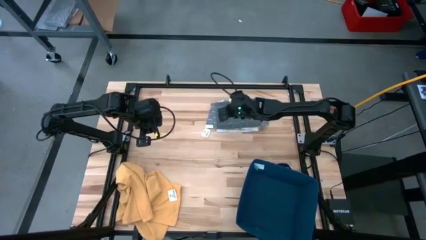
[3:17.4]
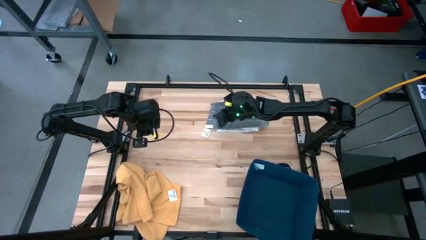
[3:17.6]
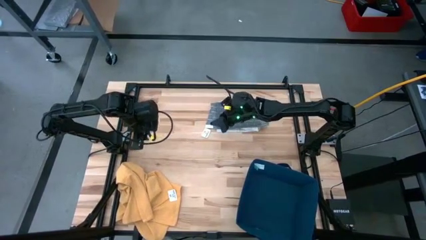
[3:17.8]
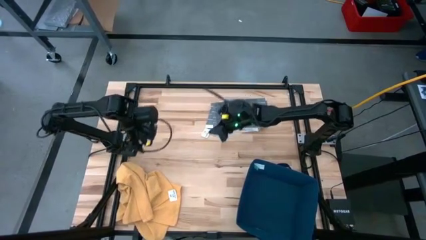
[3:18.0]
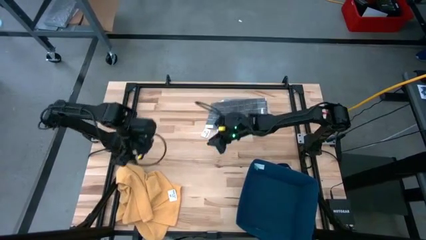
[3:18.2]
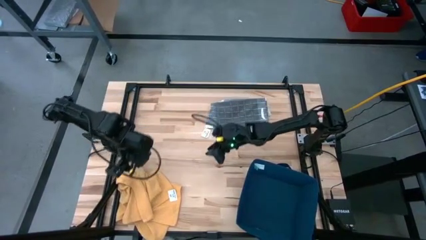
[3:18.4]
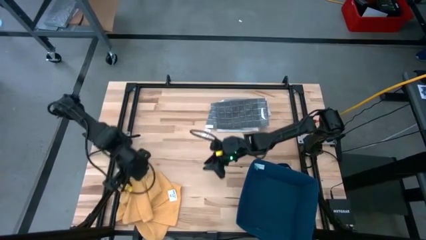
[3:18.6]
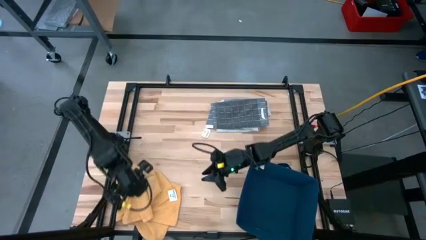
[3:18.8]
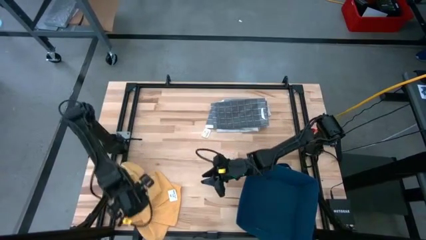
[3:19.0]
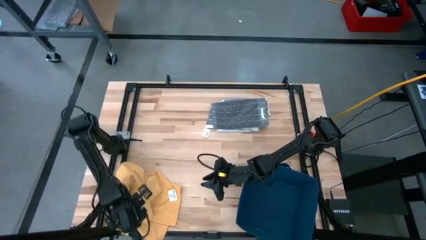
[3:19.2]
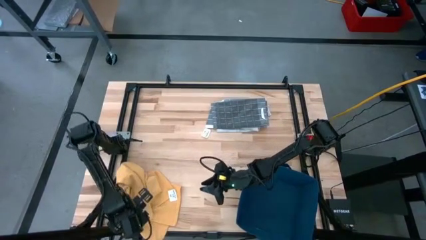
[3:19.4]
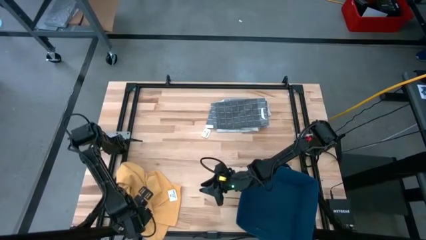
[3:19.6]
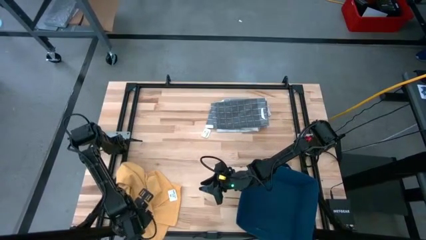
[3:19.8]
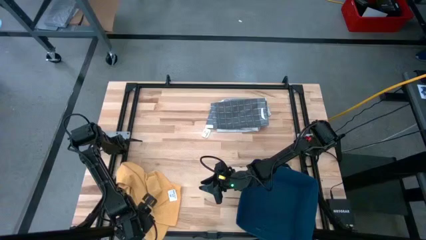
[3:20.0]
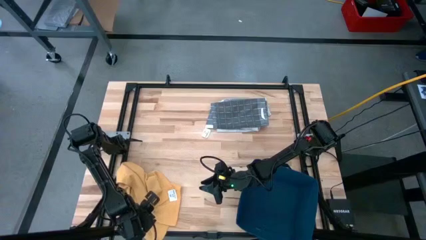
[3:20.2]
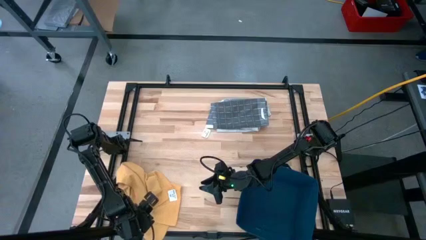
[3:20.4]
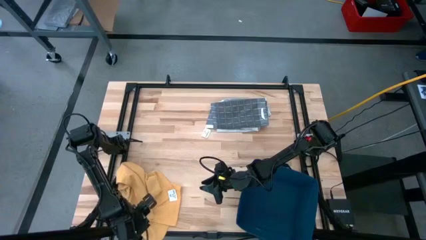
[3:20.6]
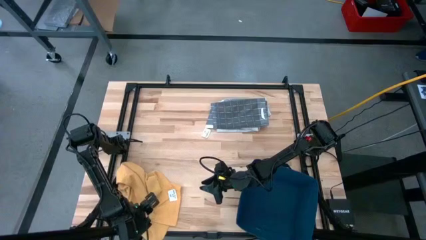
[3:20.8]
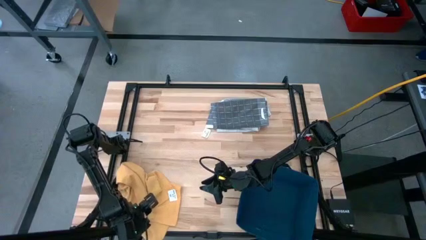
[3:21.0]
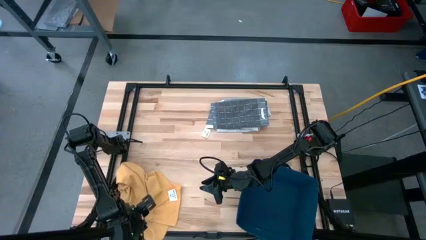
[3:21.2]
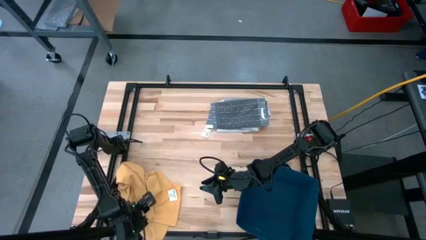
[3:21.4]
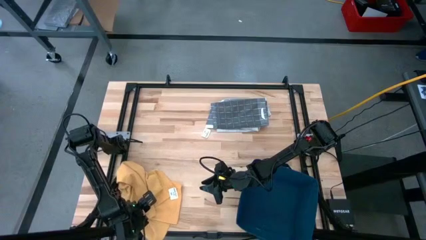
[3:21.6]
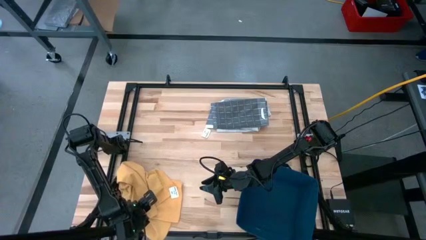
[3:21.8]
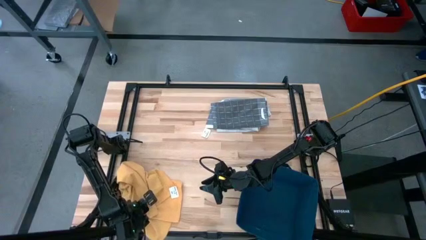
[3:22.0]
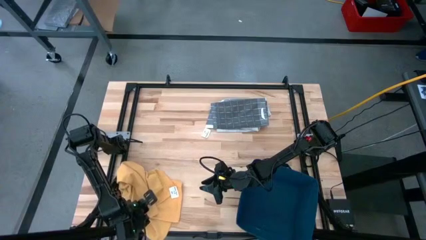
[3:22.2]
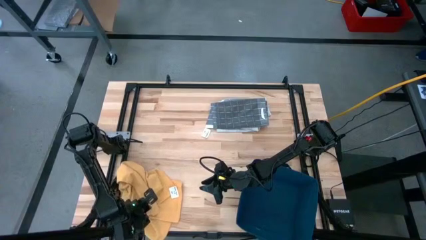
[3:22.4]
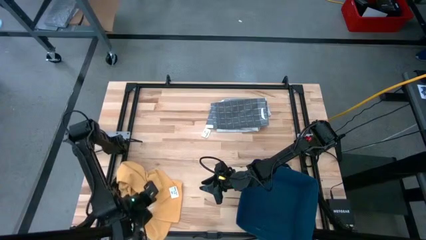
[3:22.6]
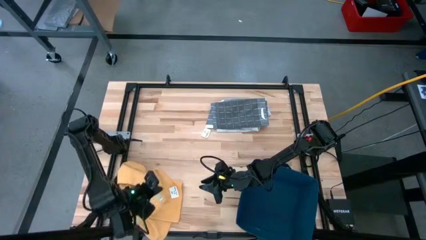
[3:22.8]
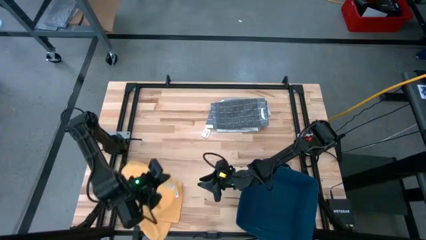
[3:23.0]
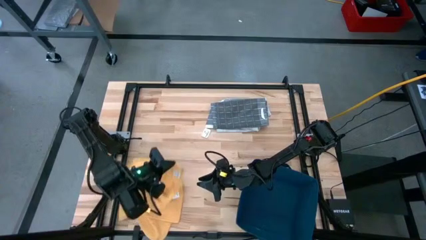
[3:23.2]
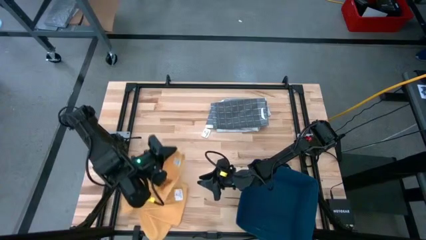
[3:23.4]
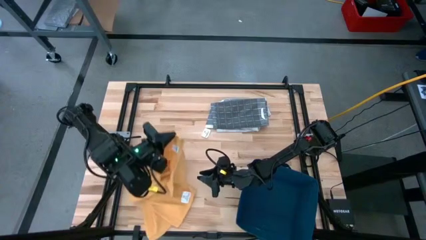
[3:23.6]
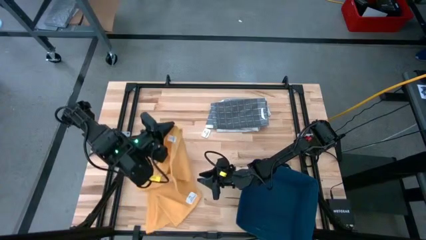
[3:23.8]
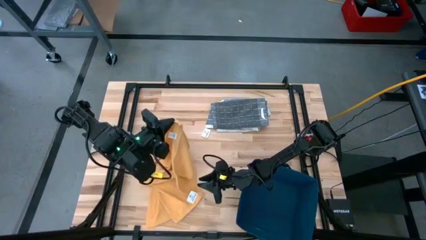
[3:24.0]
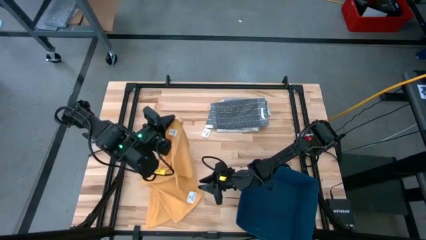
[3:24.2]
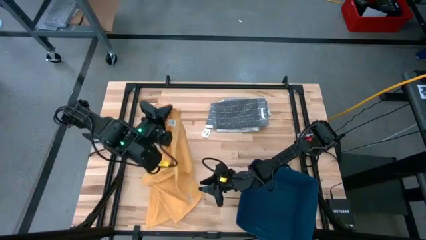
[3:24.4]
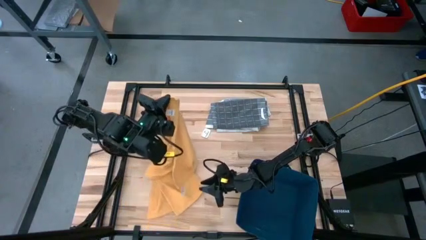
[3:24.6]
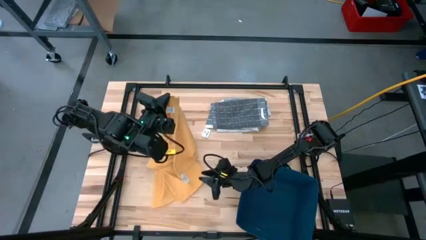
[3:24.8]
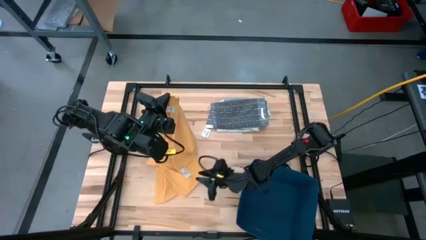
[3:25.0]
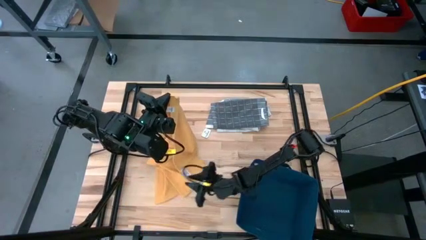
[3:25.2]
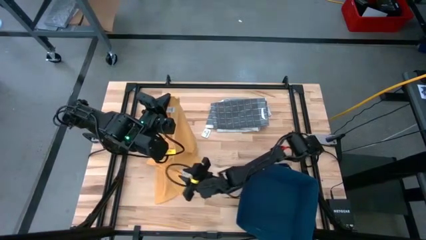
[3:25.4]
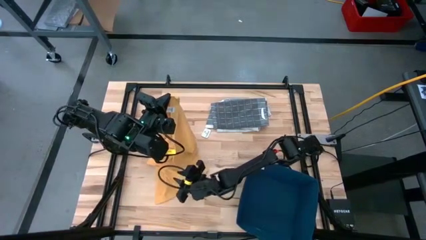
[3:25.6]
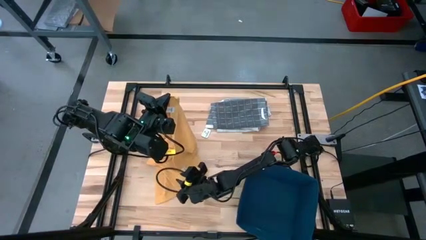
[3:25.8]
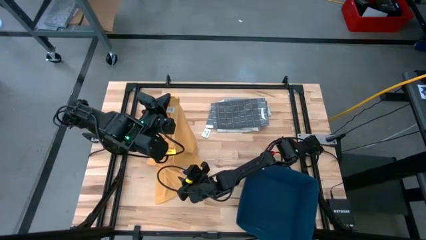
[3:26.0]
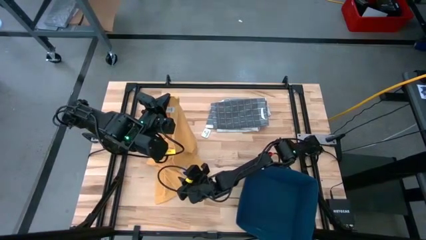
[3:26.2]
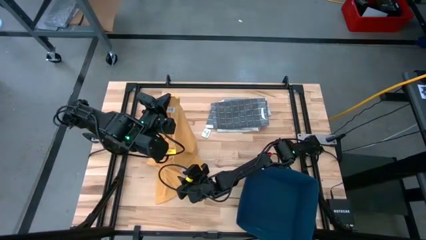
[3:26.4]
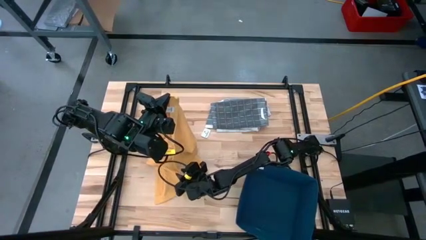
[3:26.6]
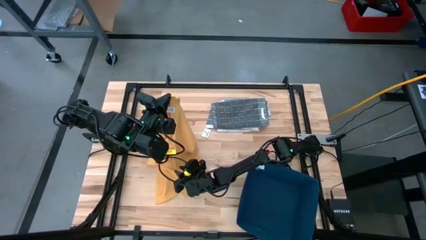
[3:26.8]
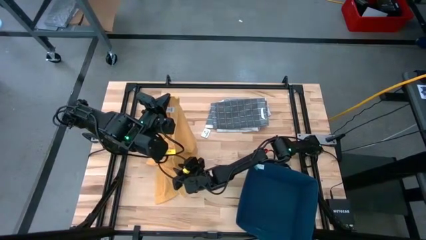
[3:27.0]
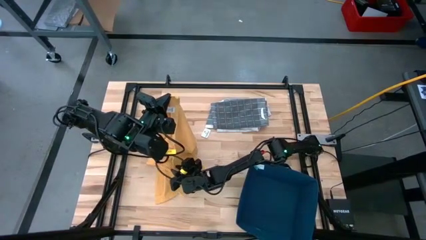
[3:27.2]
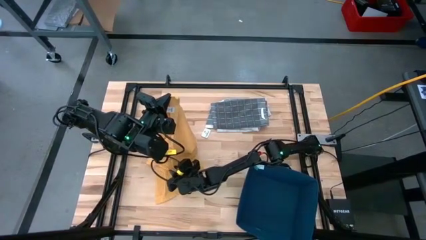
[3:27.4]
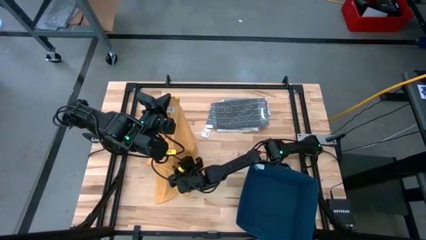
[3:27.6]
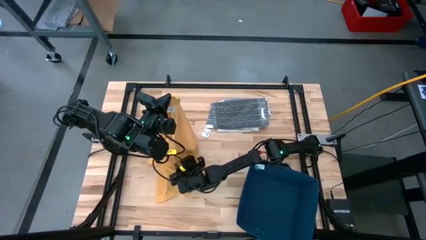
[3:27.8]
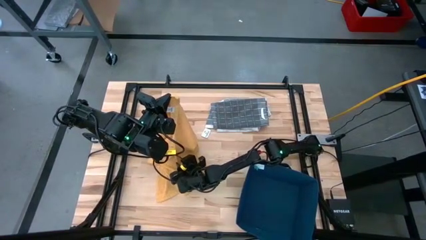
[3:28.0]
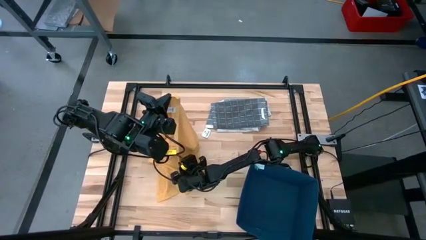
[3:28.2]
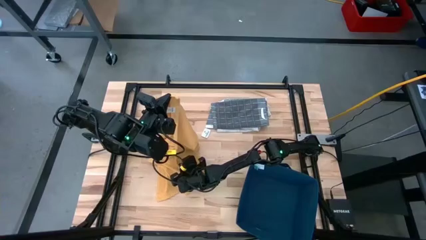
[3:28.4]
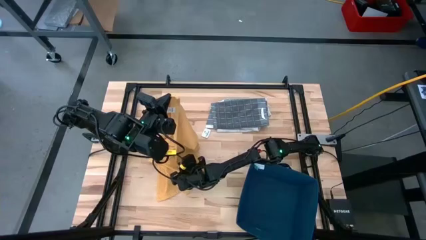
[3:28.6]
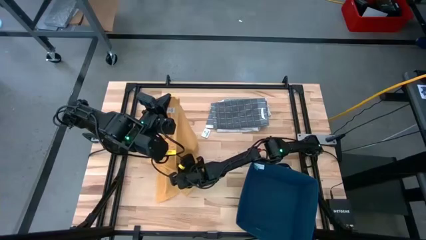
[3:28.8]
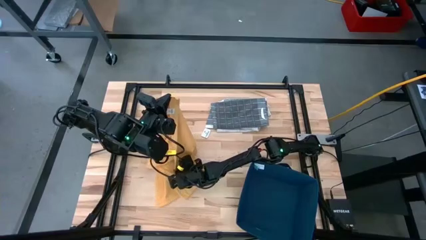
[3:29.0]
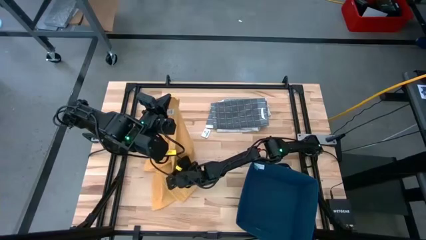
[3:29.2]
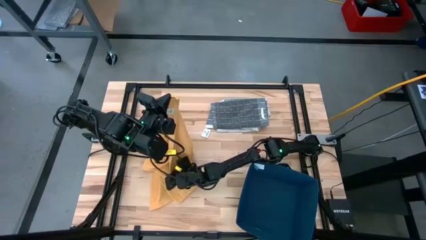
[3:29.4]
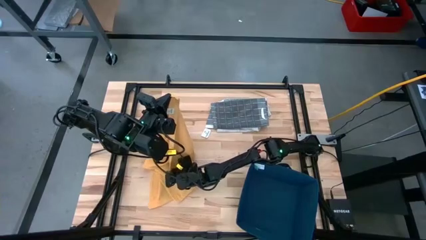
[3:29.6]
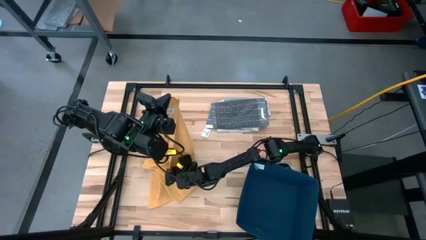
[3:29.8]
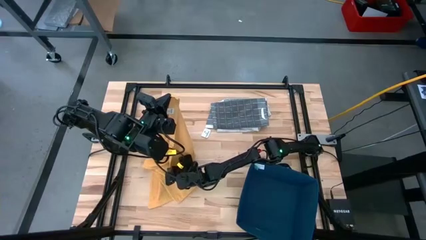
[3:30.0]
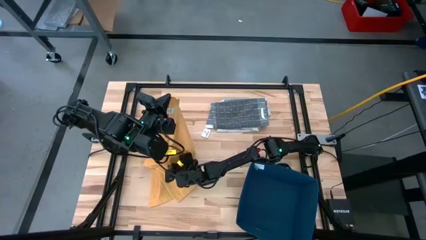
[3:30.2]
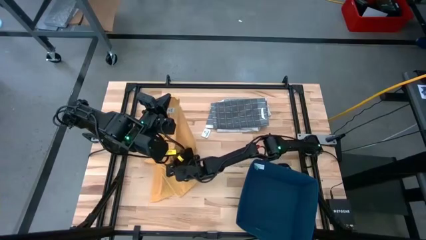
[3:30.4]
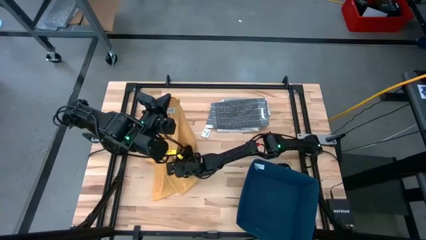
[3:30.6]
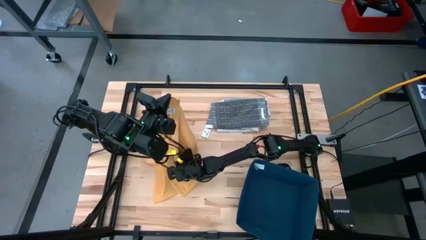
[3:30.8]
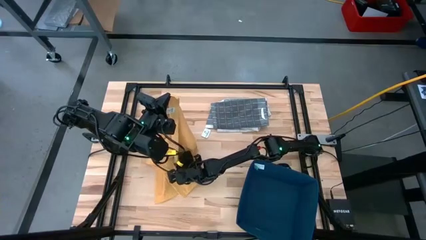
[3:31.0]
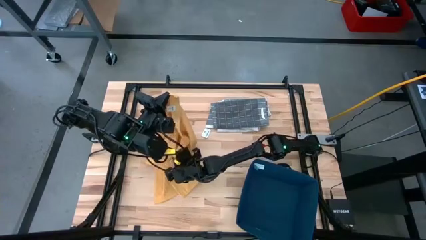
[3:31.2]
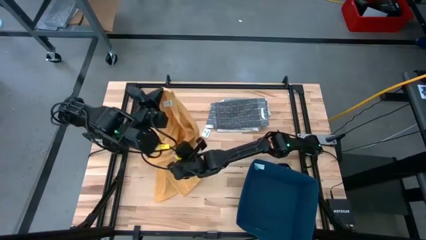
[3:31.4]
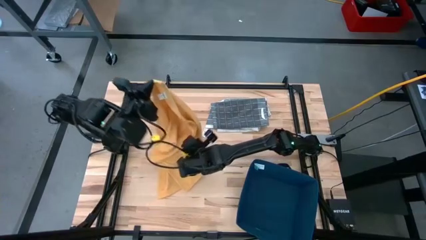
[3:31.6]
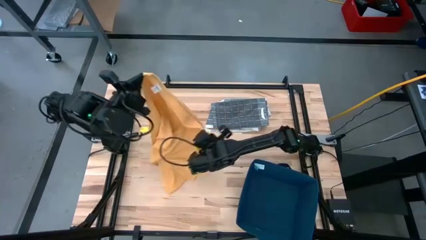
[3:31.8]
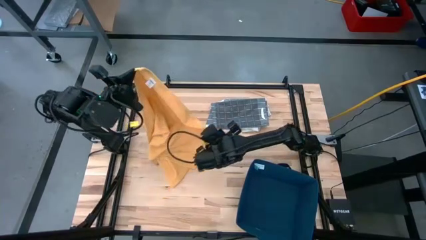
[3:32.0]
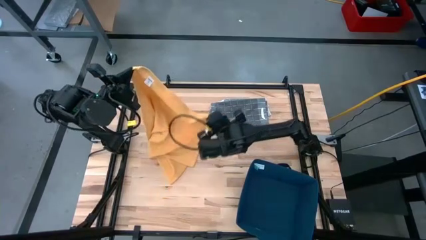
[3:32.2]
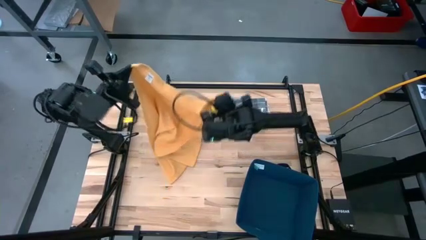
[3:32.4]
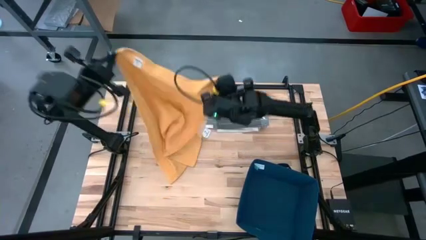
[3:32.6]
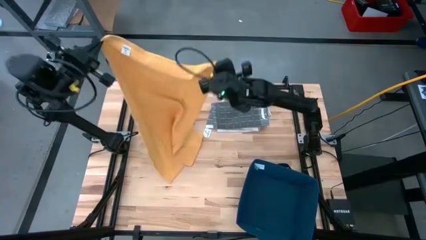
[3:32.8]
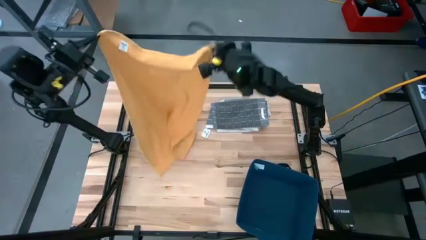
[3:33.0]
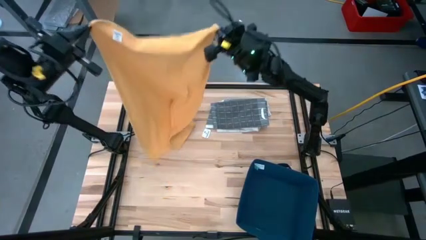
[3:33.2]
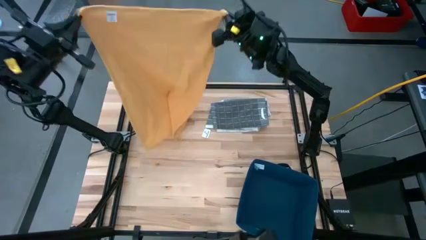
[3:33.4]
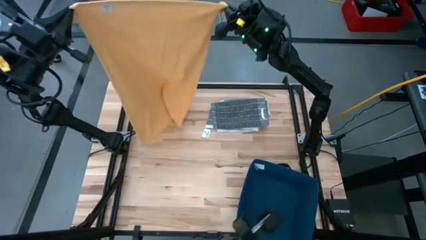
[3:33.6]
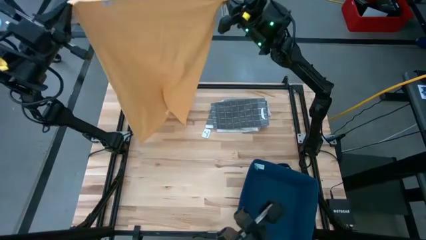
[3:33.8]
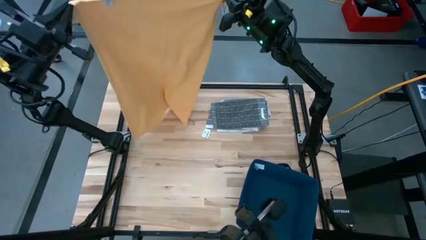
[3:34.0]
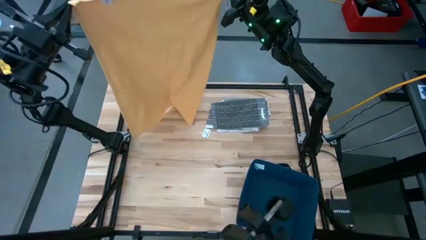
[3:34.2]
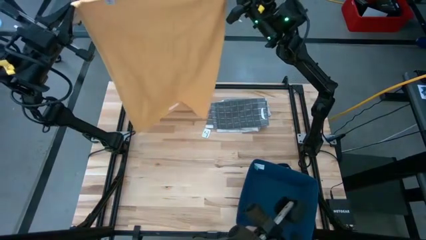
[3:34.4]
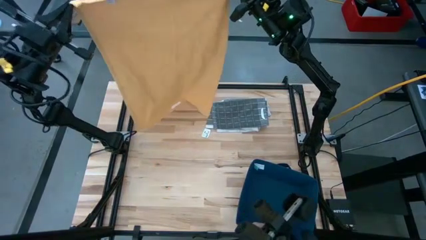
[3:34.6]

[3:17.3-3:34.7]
Task: Fold towel
Fold the yellow kitchen towel
